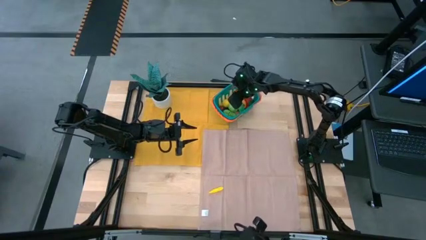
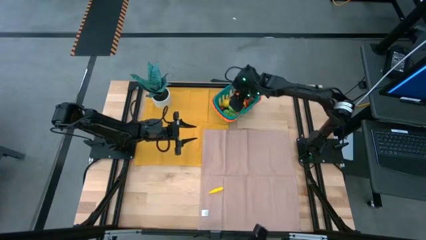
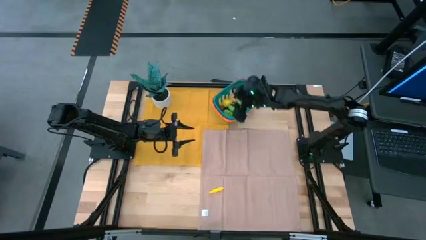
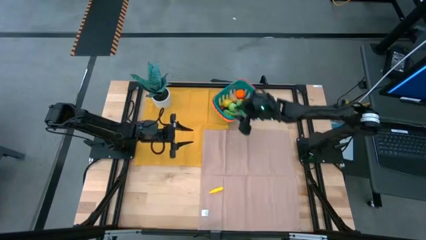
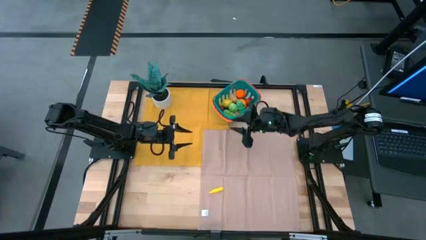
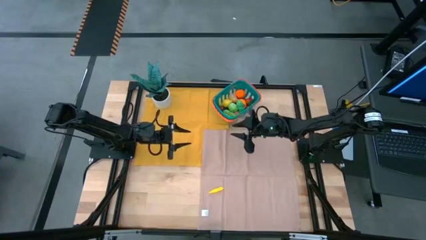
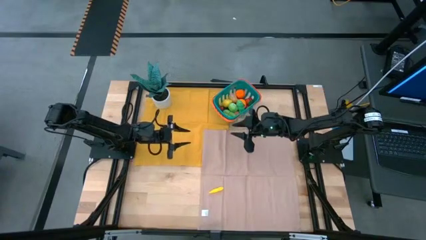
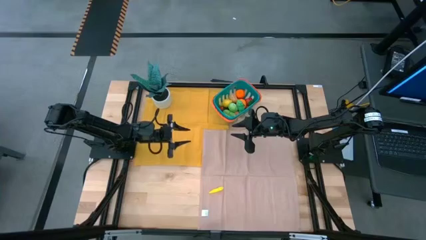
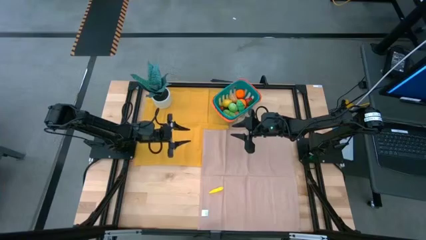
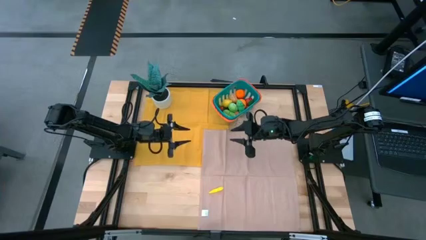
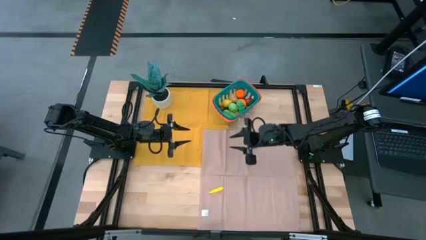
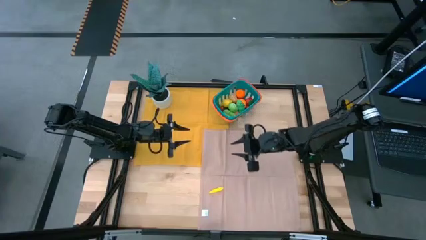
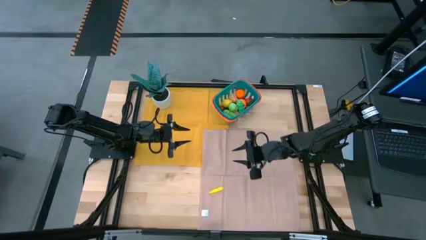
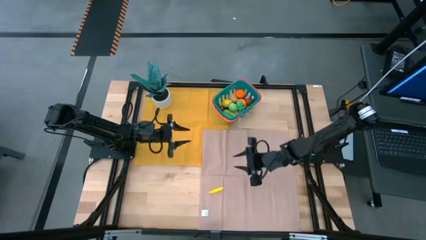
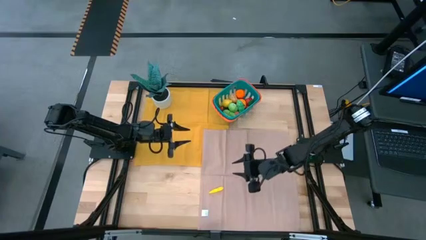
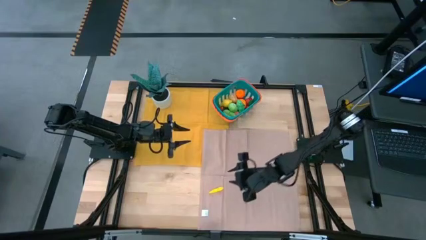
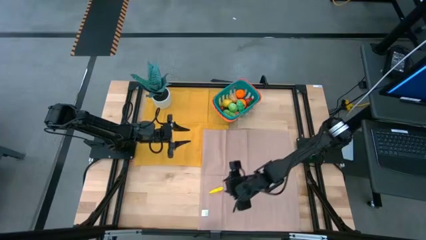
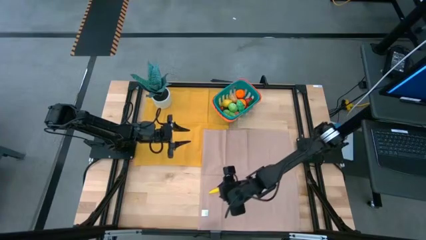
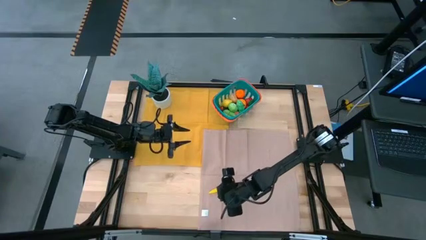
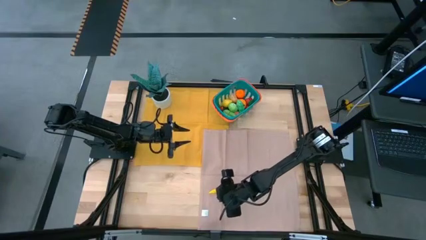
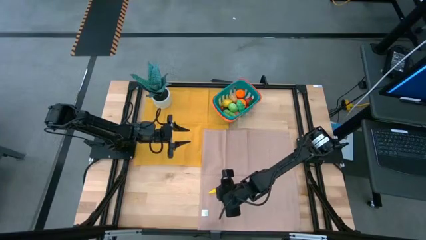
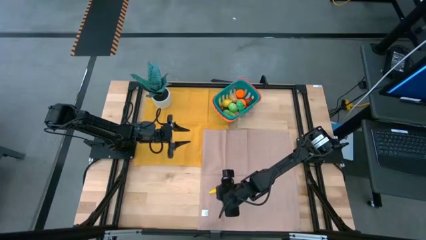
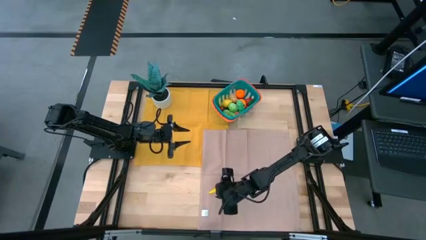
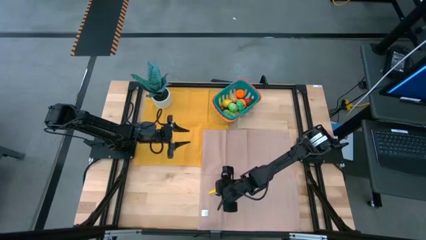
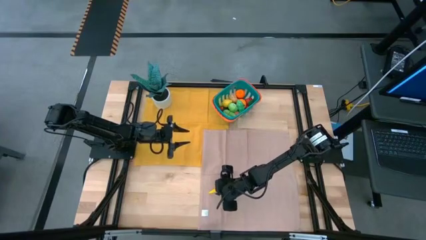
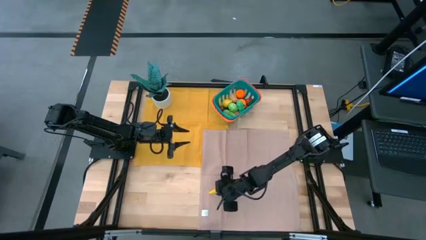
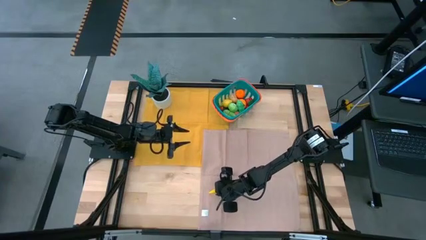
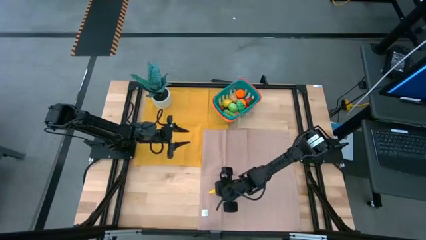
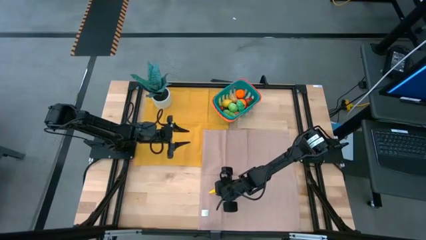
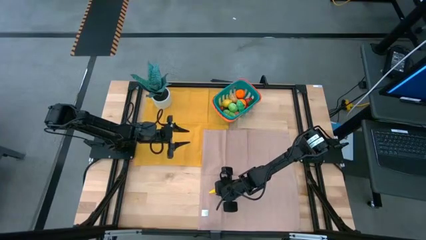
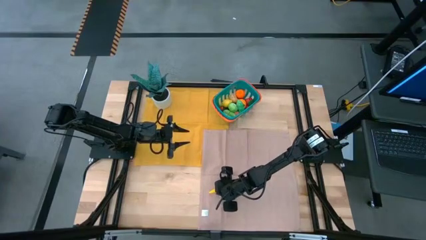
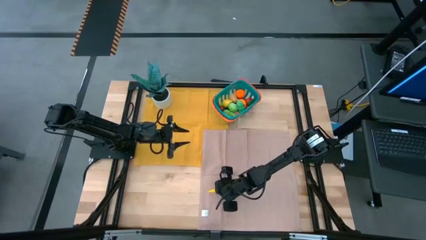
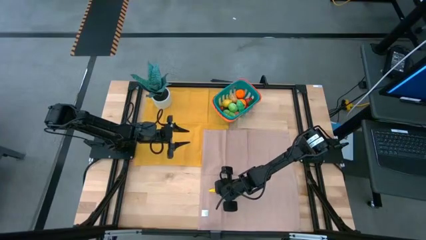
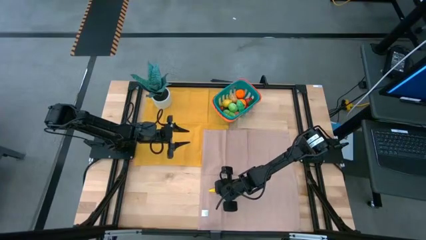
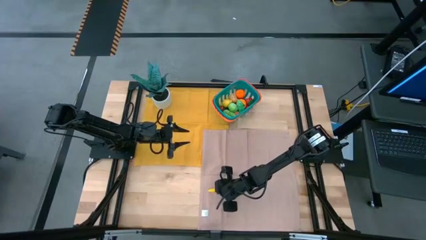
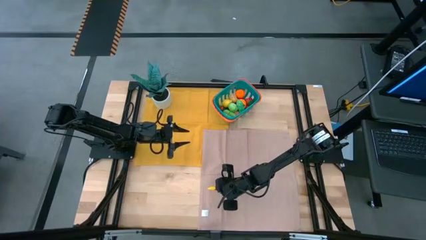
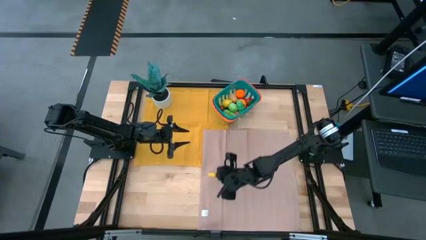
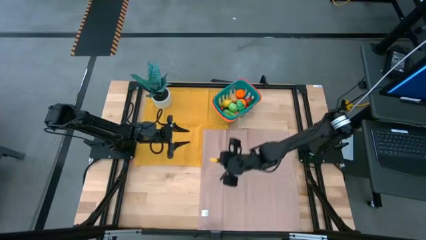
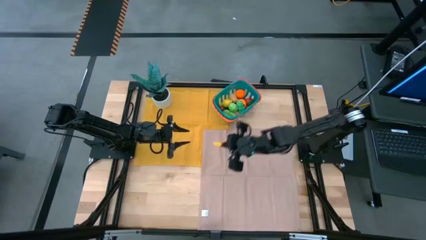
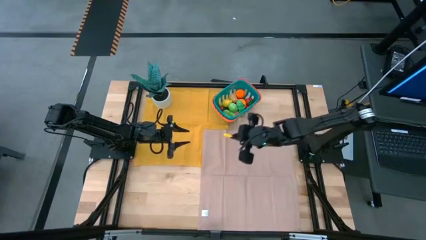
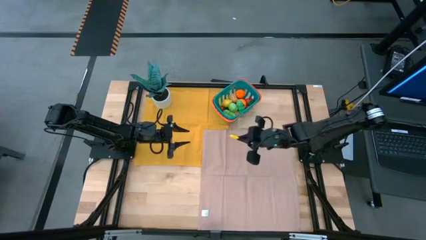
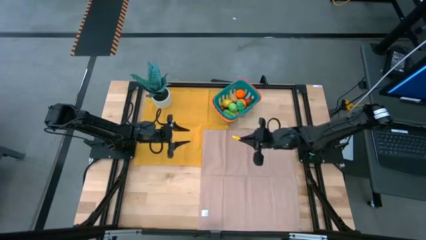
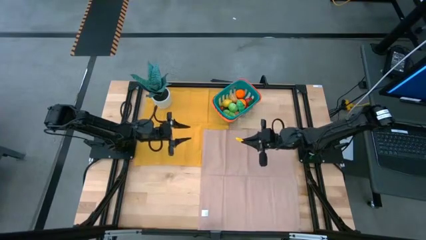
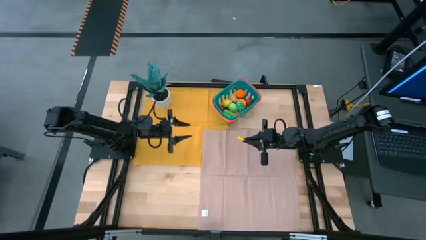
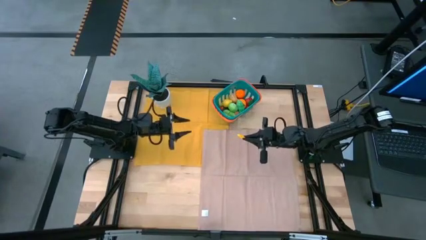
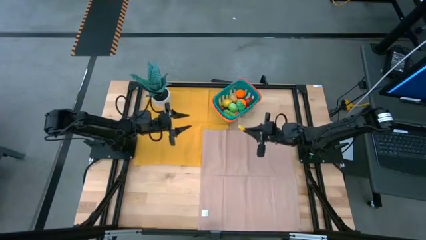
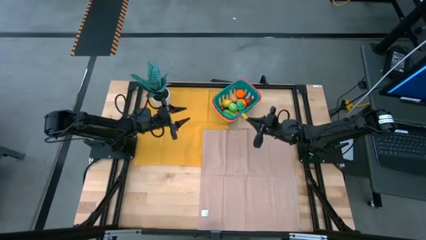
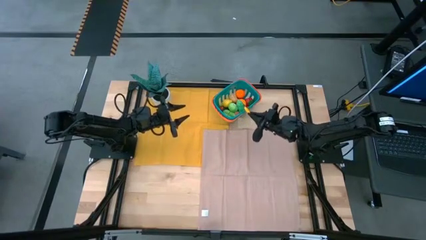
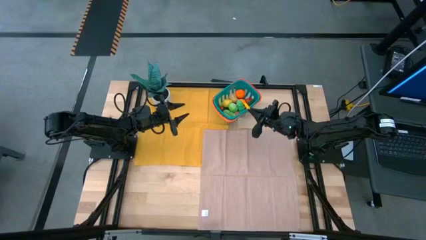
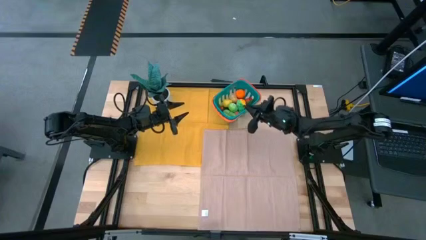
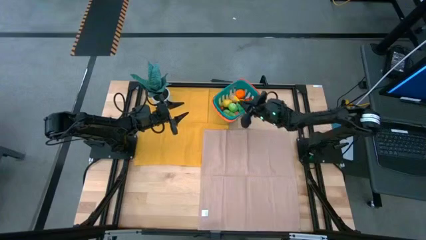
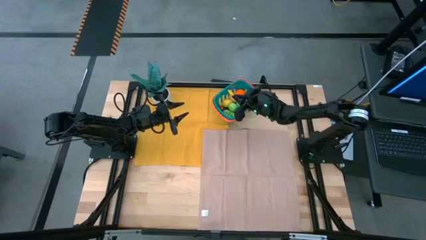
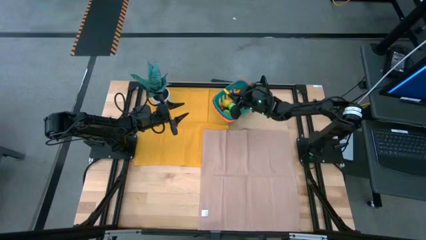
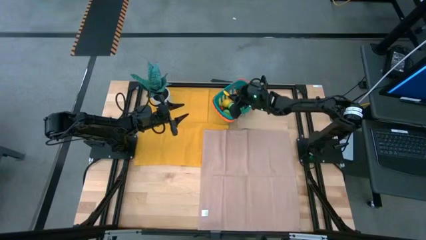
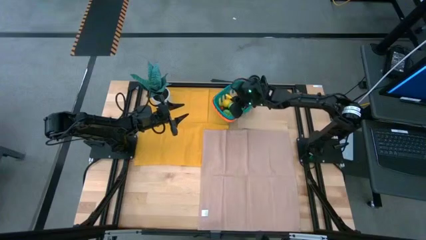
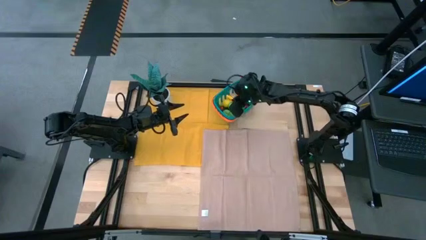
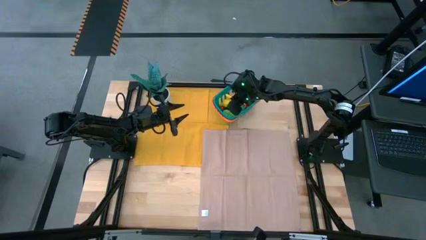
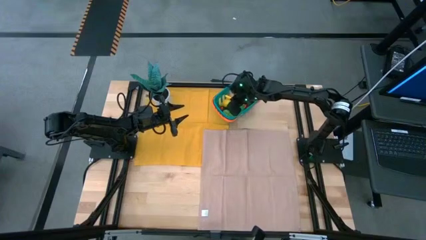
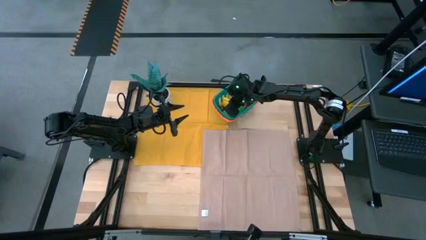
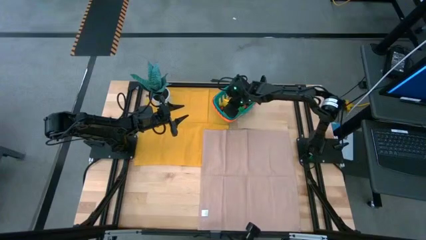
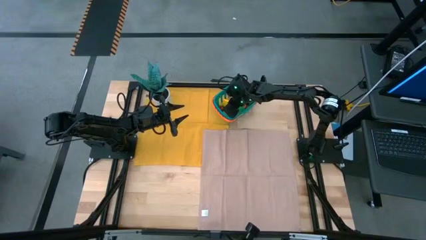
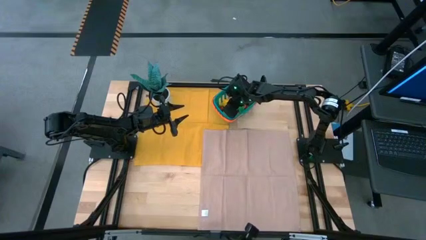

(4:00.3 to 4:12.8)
Task: Pick and placing Produce into tupperware
Put the corn into the basket

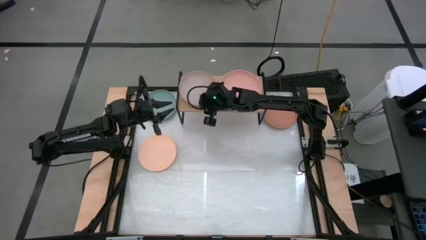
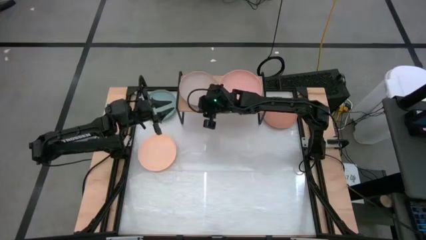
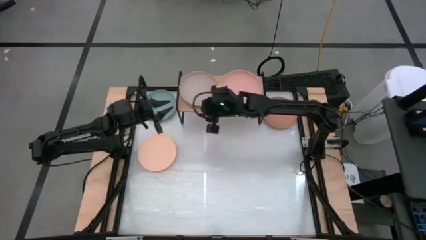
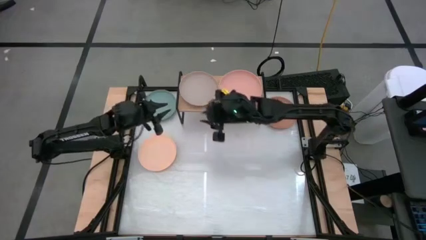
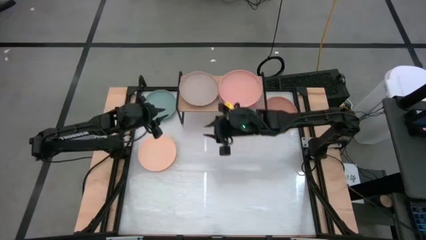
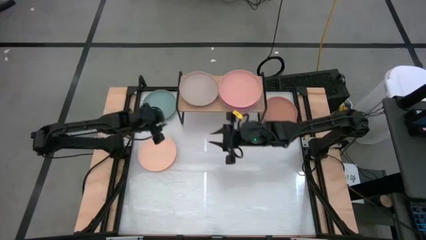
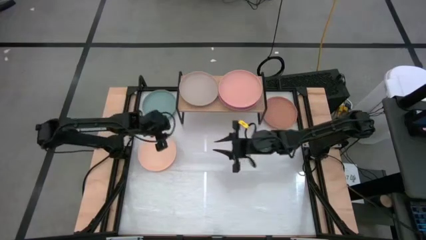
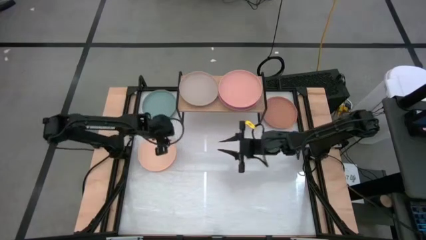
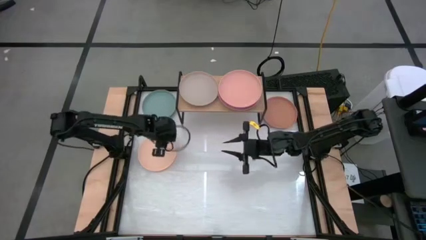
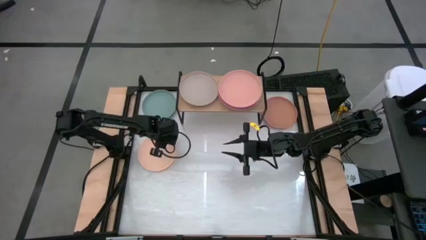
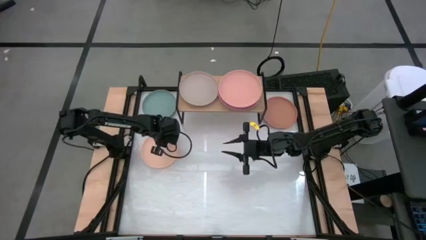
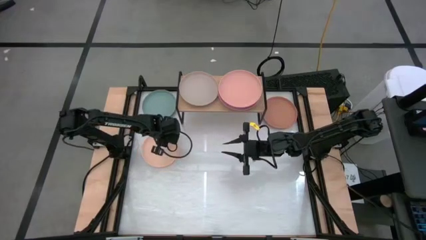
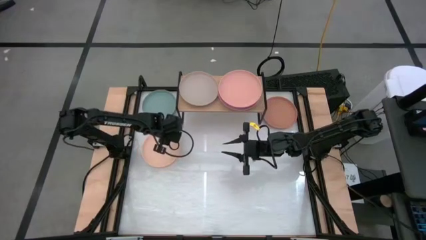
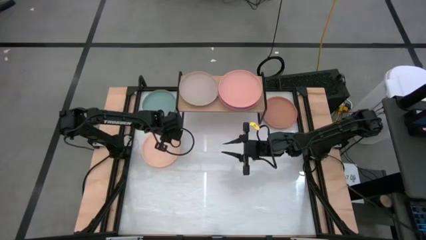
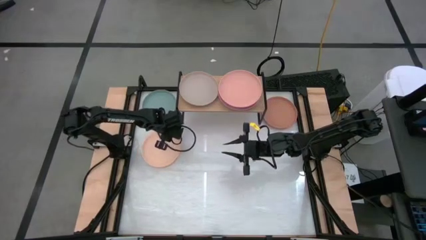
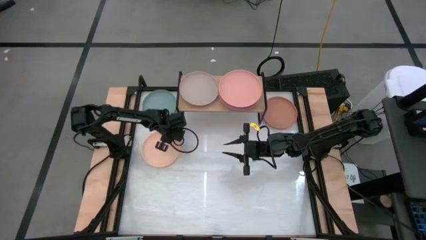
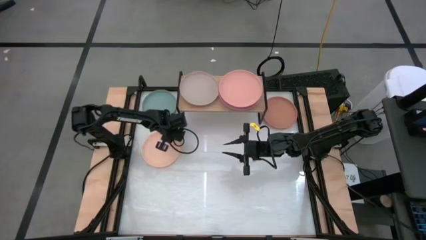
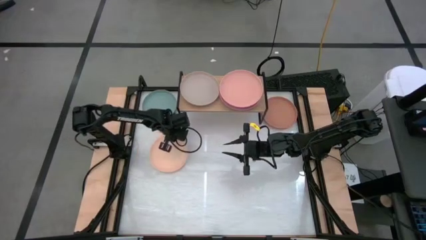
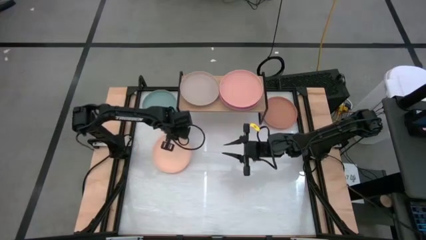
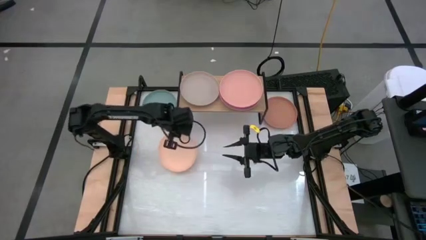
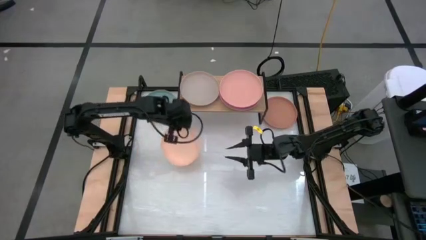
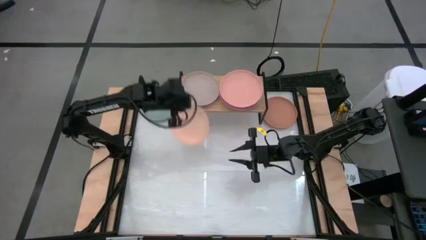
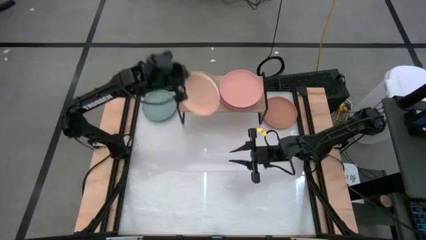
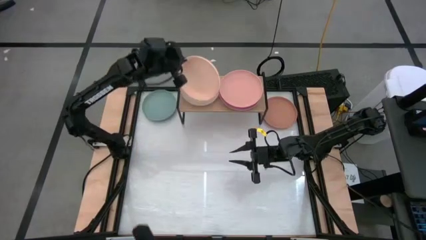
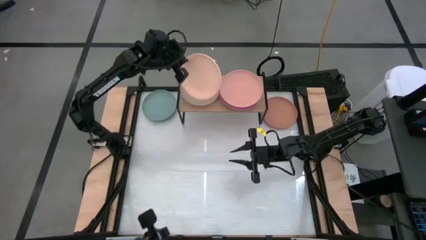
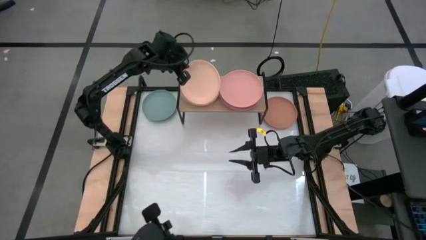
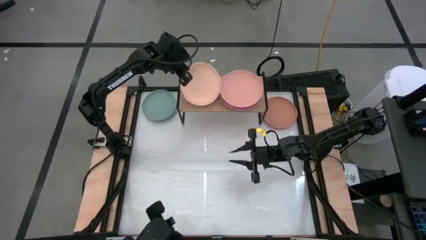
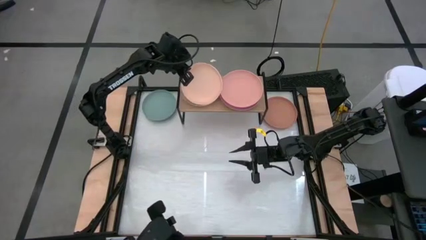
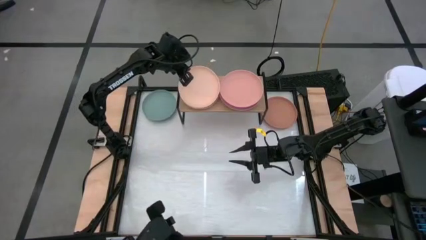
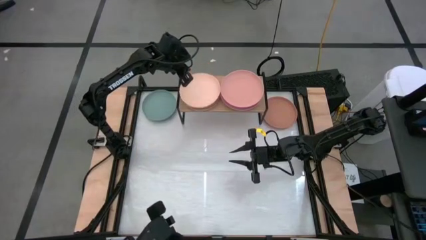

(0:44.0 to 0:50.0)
Task: Place and stack plates onto a shelf
Stack the light orange plate on top of the gray plate on the shelf
